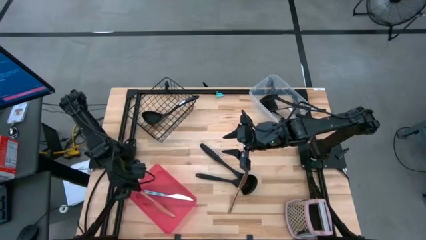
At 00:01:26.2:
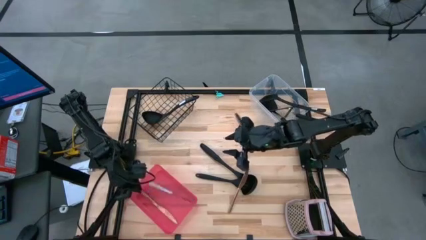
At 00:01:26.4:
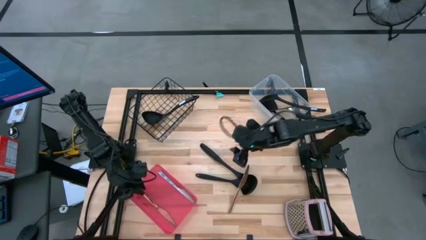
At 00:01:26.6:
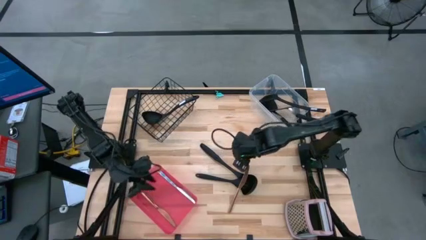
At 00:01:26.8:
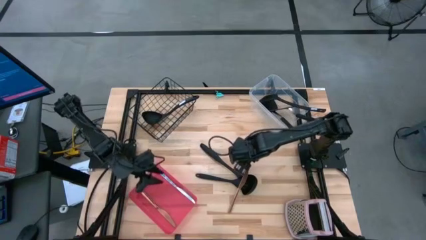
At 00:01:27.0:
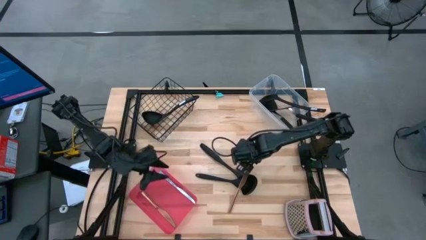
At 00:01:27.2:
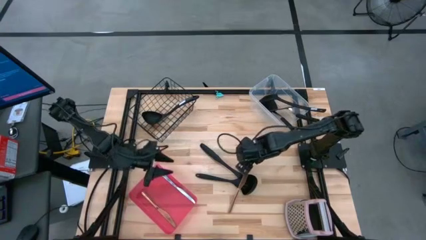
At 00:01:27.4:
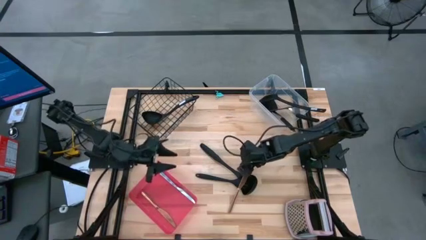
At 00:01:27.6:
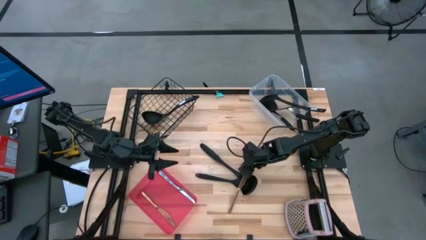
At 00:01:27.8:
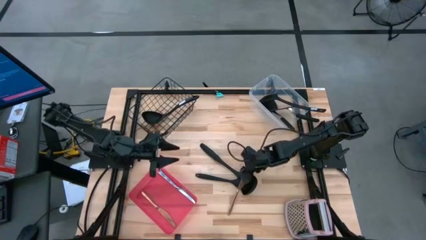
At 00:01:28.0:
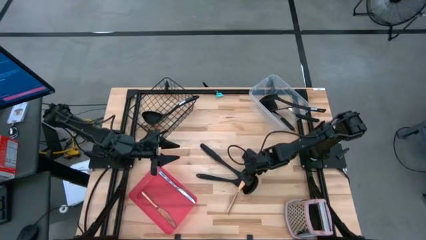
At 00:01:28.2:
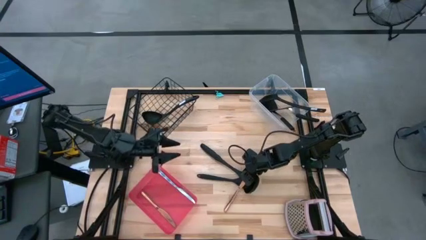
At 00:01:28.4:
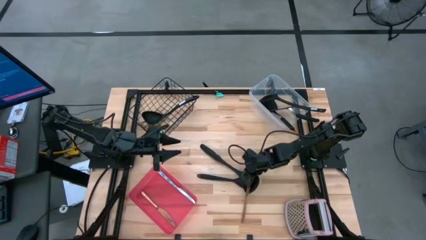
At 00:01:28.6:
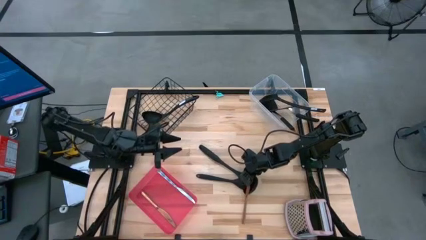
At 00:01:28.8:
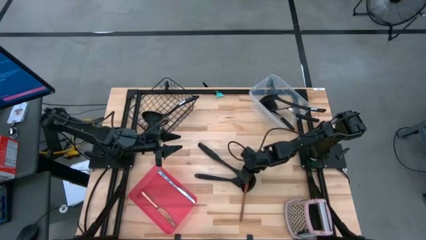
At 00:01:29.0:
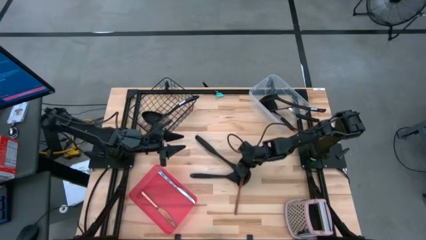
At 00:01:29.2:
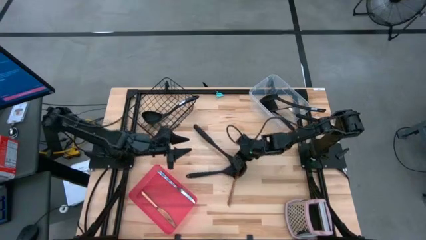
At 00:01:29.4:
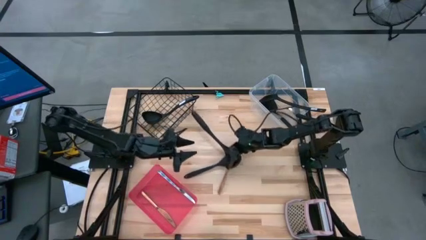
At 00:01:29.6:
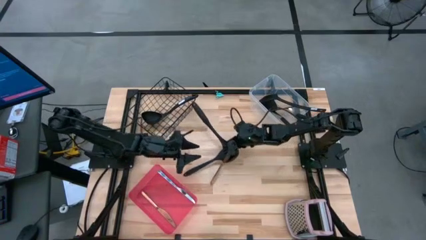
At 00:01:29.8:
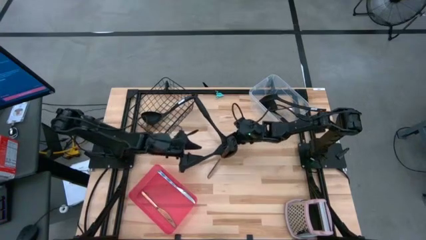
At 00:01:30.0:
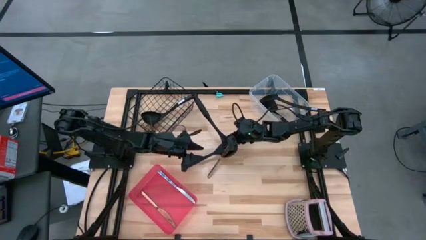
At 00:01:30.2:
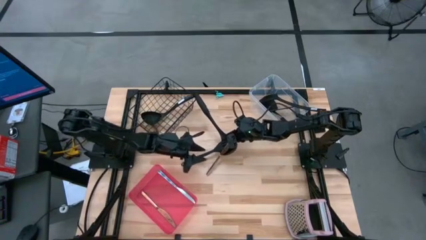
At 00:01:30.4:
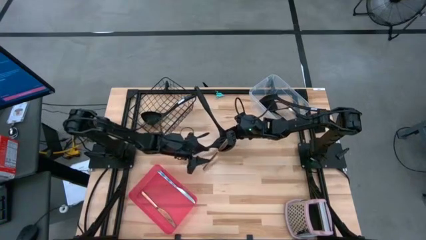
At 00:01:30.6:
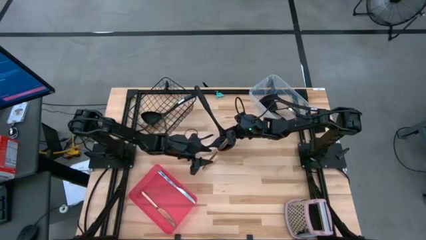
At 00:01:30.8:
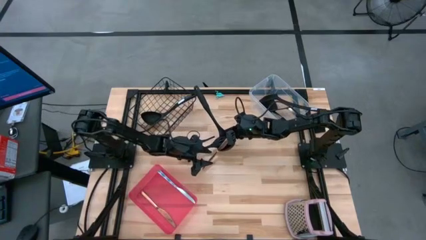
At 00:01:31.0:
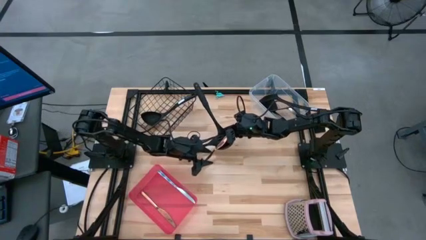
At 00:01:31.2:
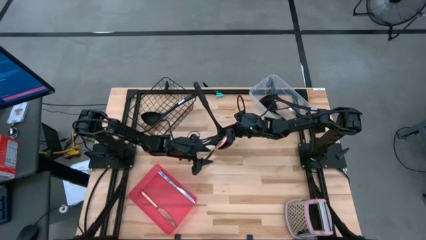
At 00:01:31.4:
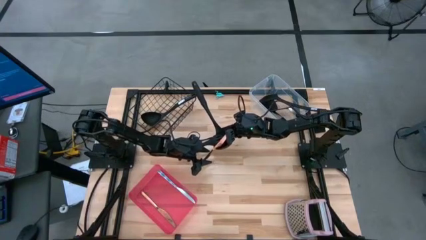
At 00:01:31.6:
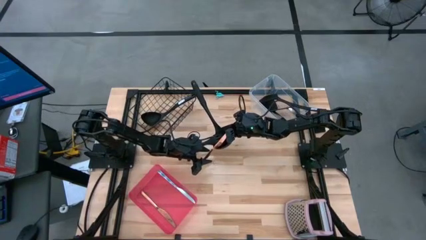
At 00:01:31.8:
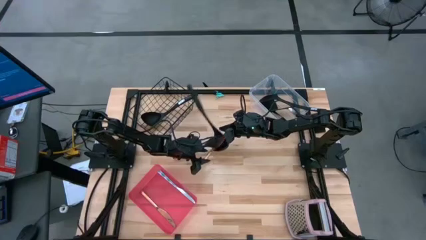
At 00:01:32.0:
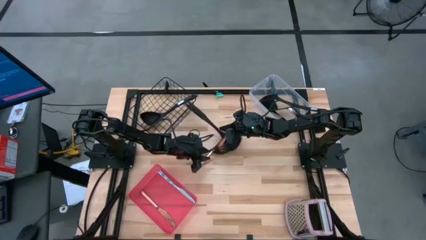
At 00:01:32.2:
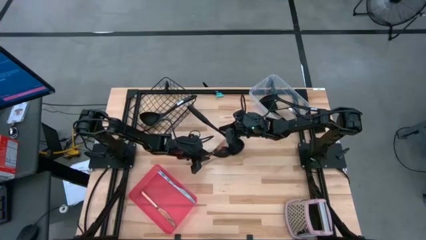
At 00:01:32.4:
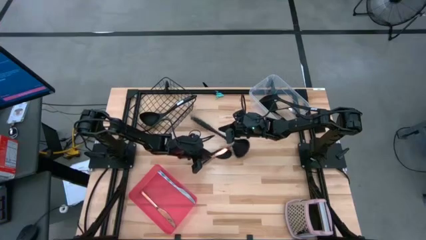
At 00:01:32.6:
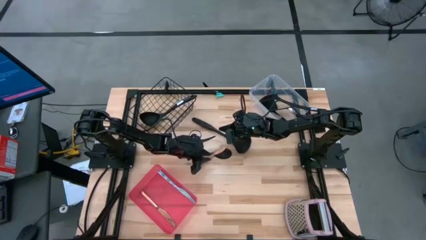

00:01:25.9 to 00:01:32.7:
Task: Pick & Place Kitchen Items
Put the gold table knife into the red bin

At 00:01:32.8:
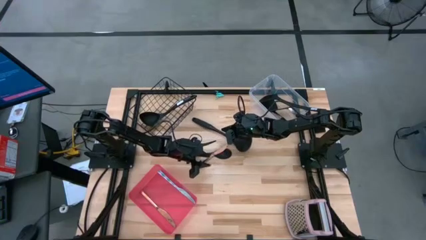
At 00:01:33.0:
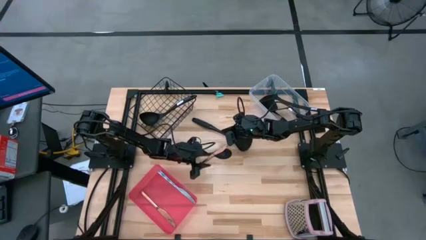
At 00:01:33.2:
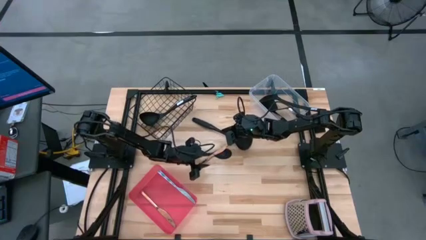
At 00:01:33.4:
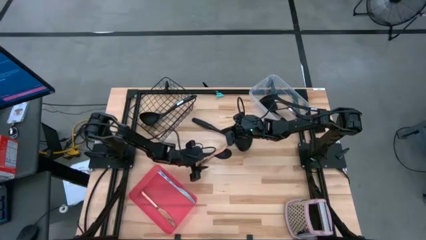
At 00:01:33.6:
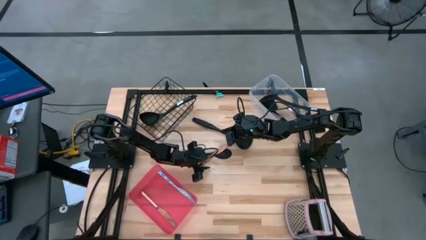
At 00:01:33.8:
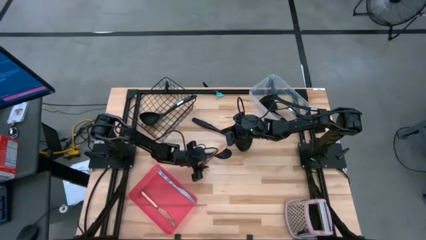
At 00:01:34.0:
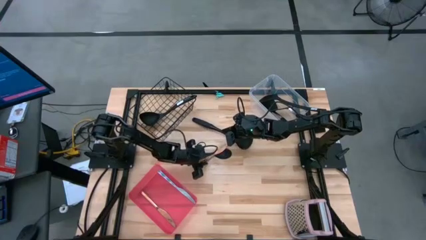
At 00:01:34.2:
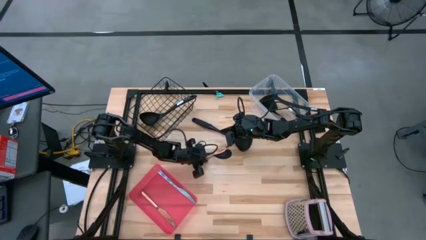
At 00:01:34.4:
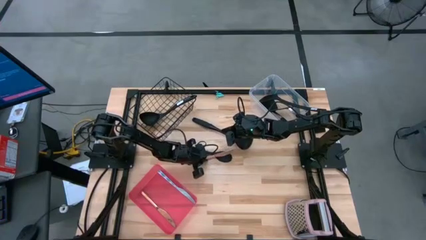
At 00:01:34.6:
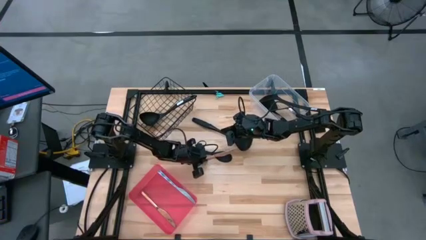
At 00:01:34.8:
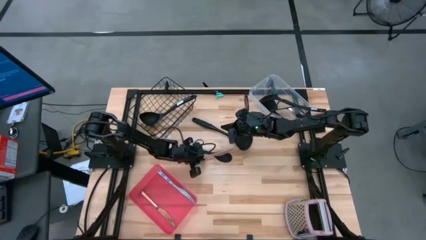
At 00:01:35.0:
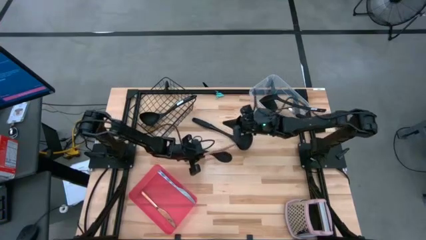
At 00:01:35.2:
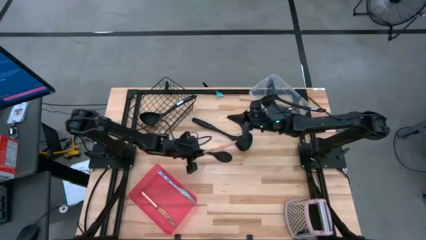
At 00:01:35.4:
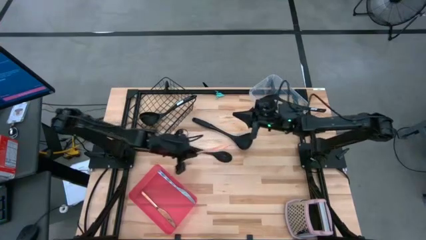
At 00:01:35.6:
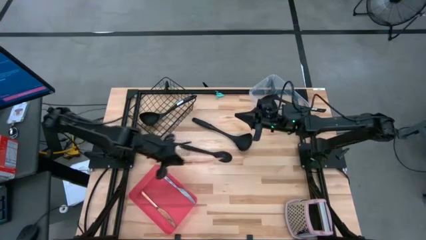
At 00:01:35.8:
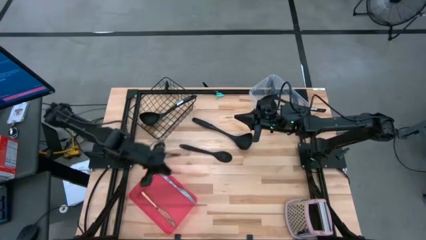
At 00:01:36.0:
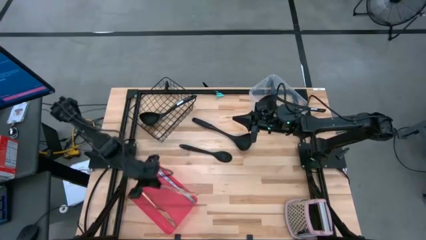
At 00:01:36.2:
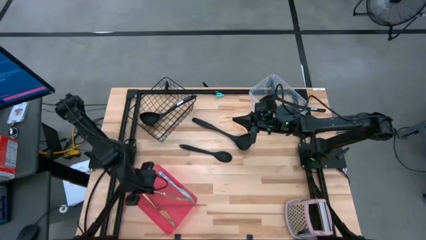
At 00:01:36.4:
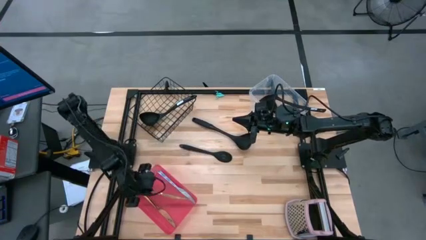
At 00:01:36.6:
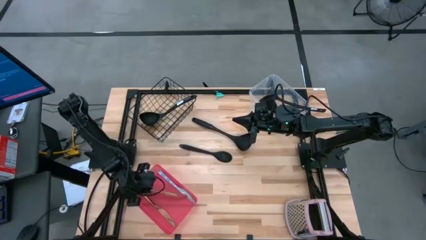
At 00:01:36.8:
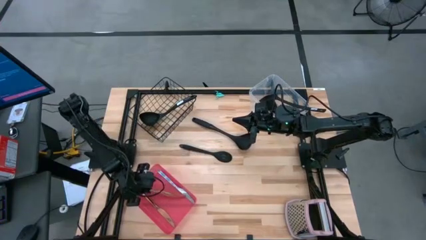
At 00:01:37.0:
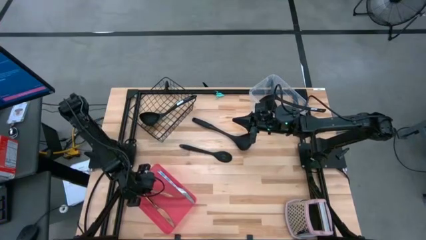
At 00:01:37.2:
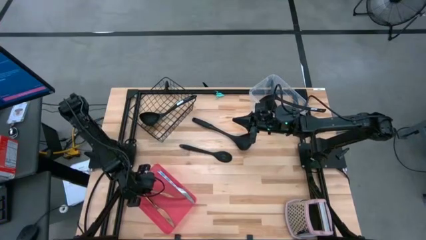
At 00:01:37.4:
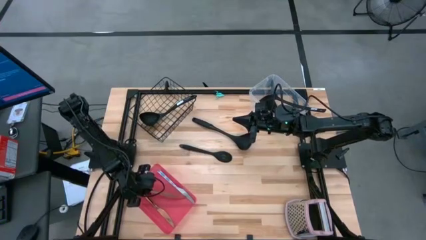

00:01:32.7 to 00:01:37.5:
Put the gold table knife into the red bin

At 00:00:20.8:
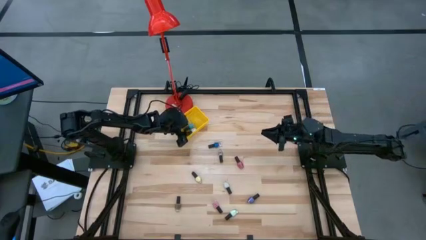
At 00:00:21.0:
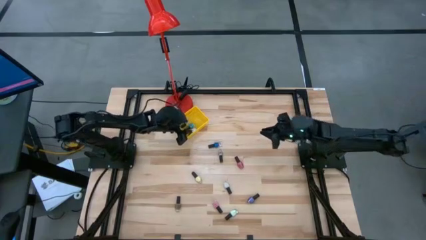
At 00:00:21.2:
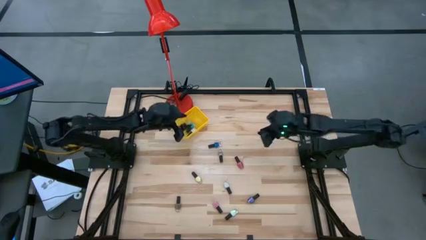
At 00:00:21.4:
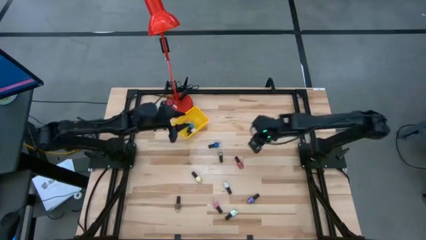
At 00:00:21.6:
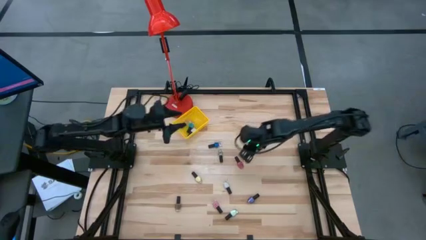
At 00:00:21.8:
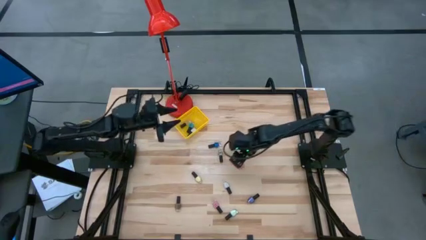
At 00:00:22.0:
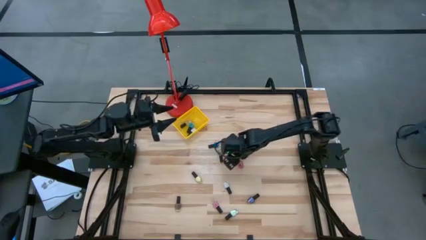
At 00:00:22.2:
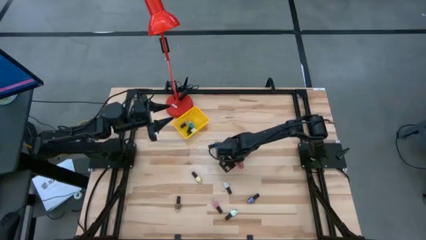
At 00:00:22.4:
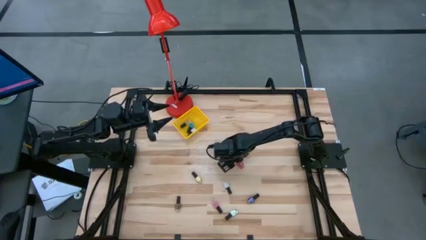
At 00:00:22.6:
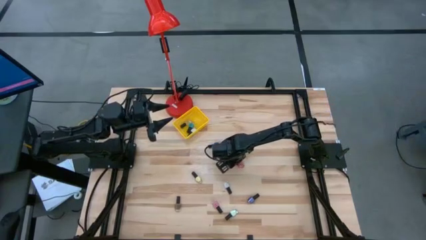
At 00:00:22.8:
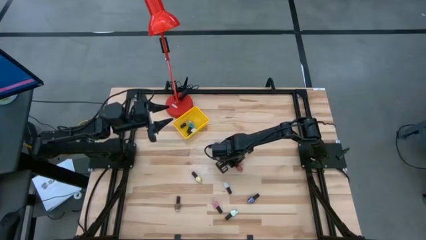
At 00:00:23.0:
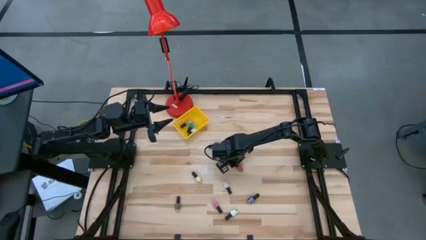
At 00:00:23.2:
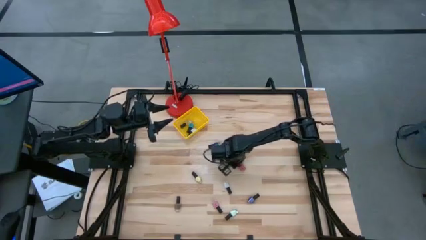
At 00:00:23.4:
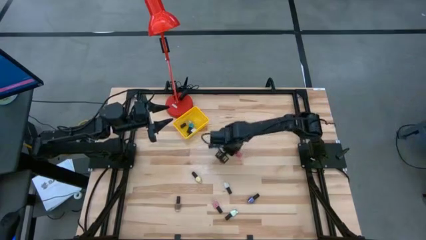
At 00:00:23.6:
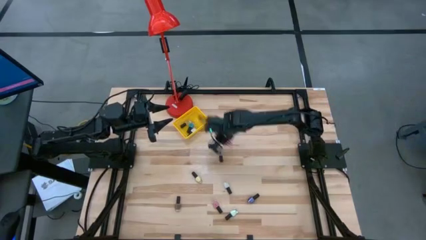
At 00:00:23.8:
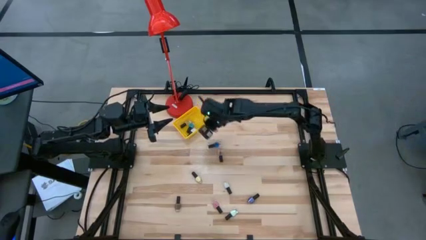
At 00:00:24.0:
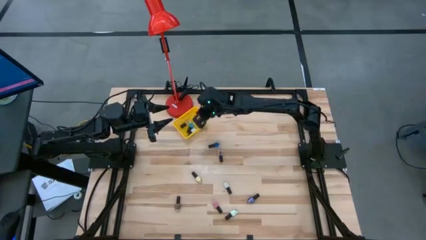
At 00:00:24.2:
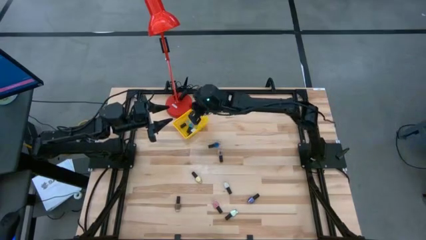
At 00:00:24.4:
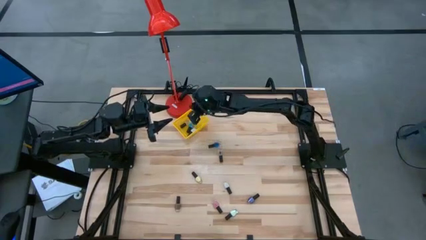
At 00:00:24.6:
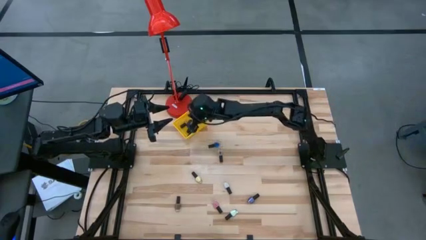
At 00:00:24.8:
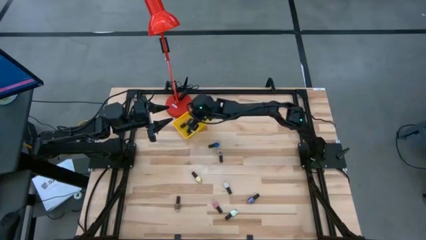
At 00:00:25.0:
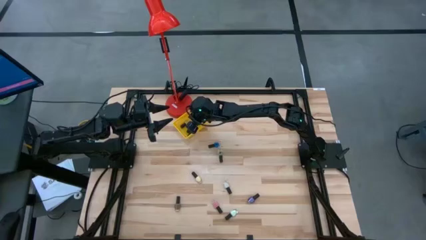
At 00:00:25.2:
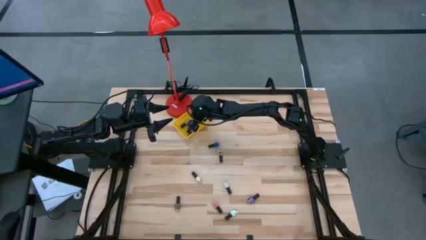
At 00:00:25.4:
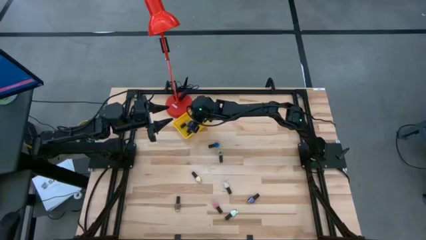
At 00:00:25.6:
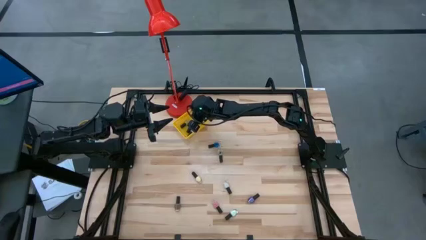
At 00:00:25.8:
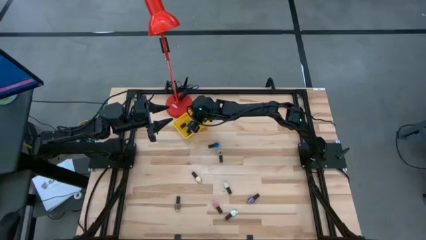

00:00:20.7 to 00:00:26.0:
Task: Pick & Place Nail Polish
Put the pink nail polish into the yellow basket
